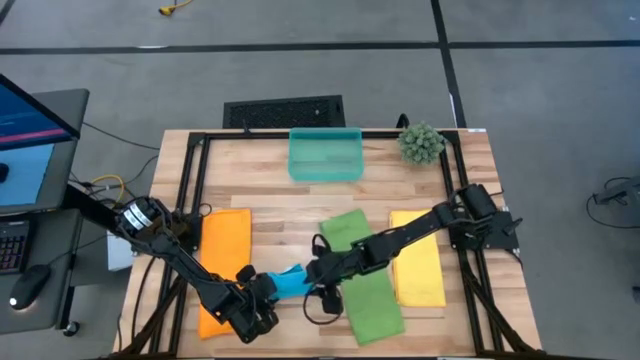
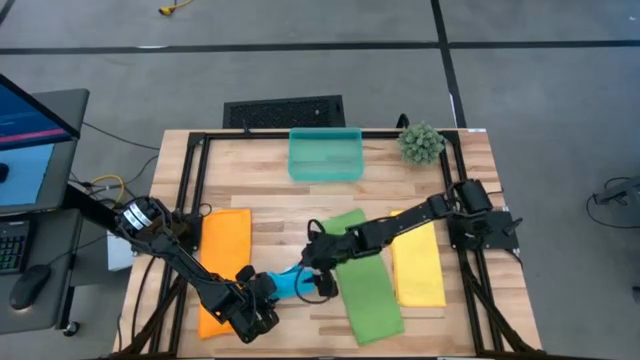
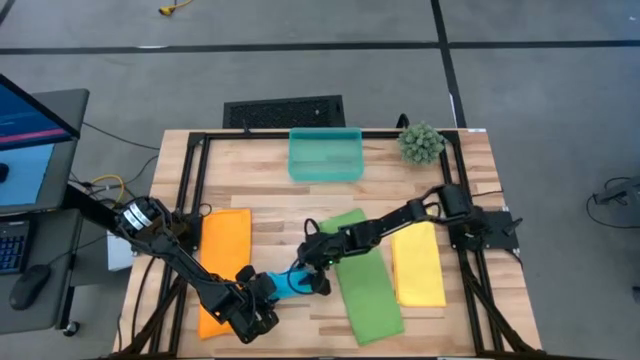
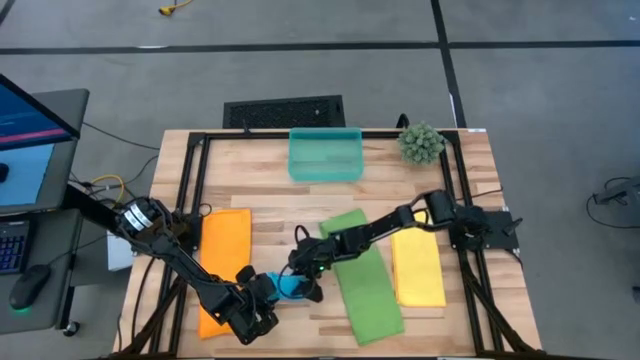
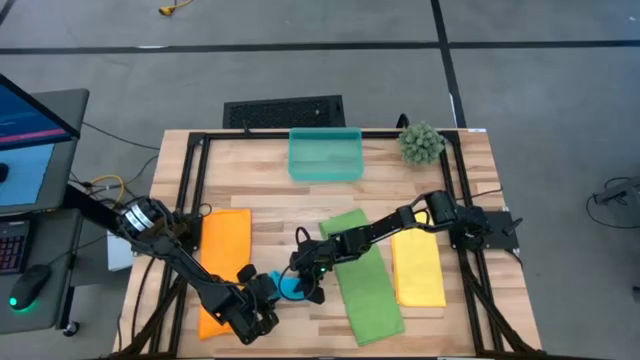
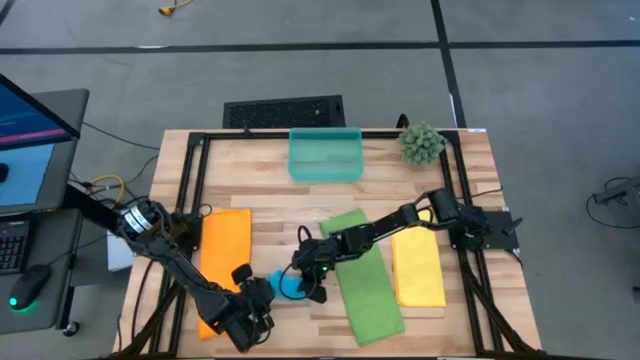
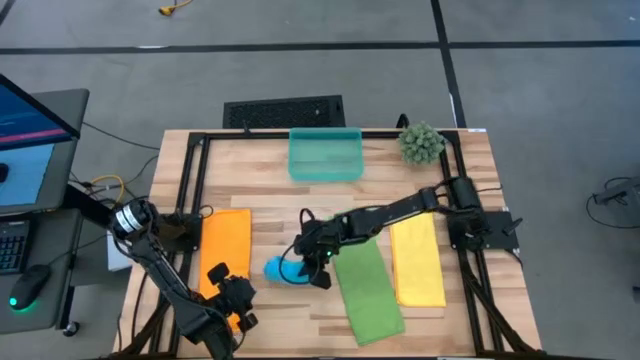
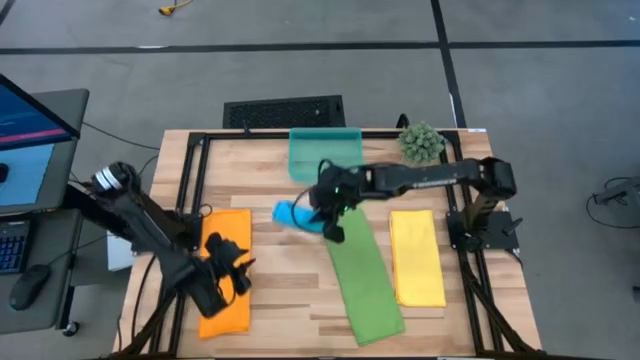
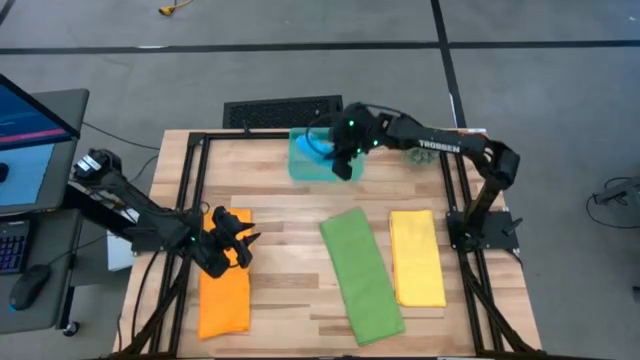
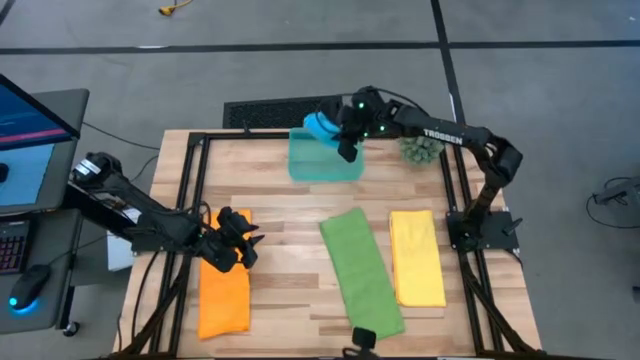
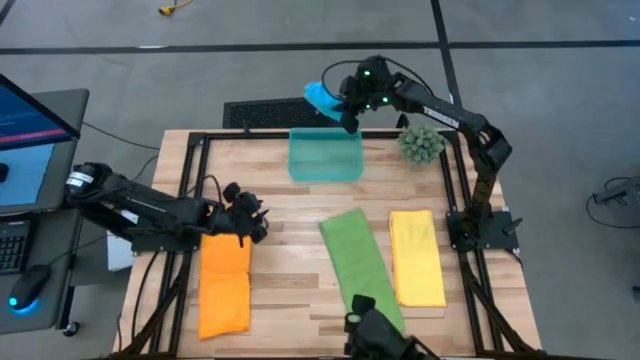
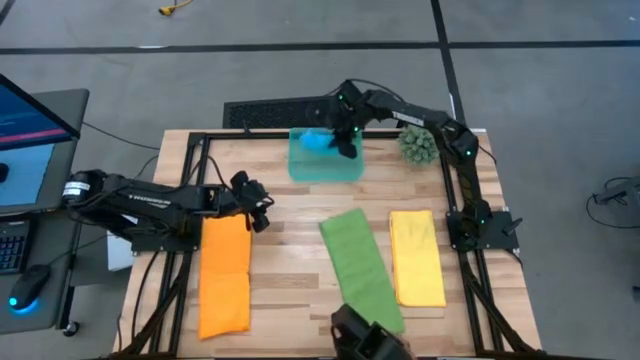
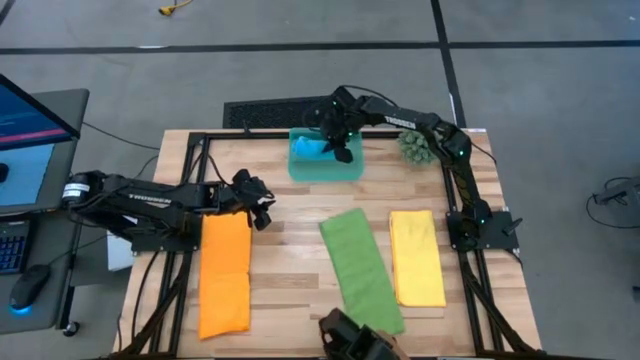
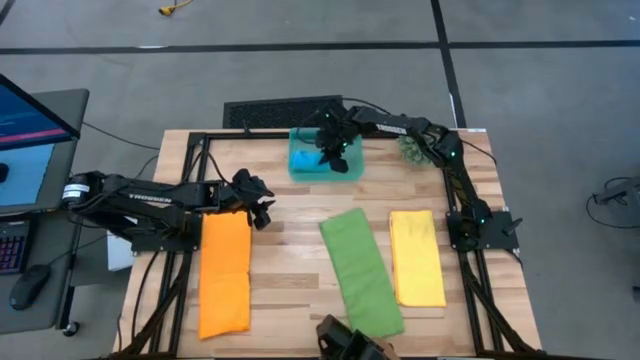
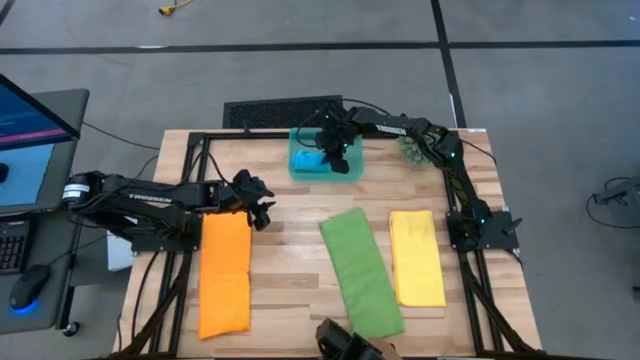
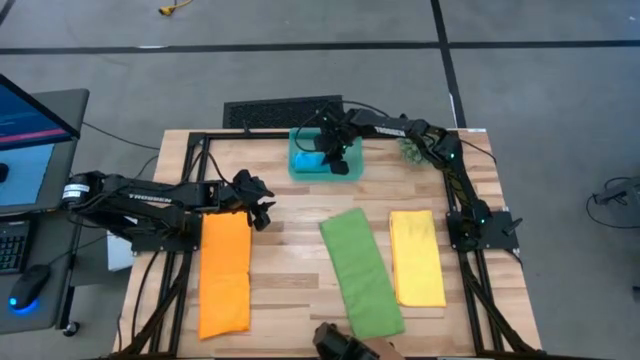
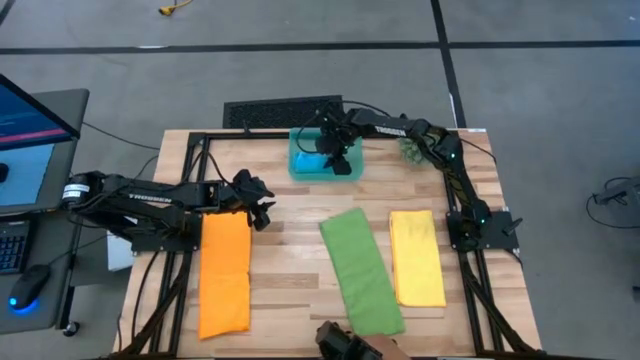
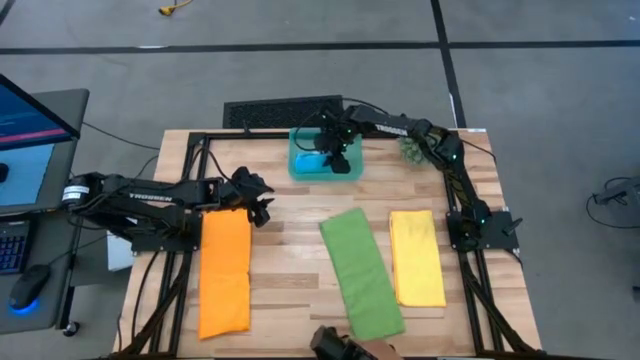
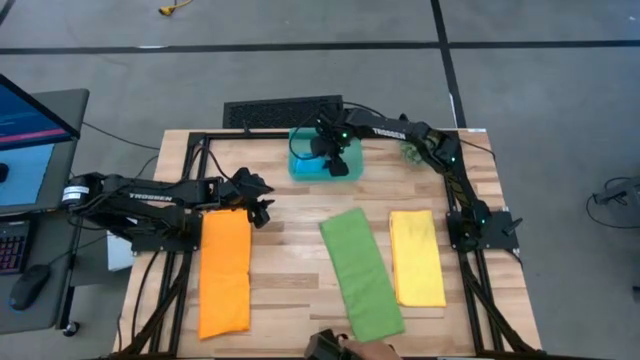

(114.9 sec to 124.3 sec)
Task: Roll microfiber towels into tight, uniform cylinder then place into a basket
Put the rolled blue towel into the green bin

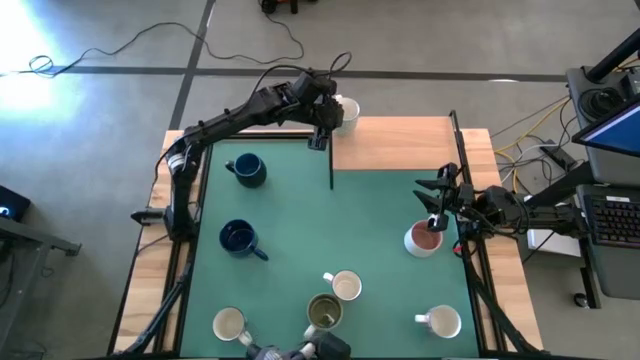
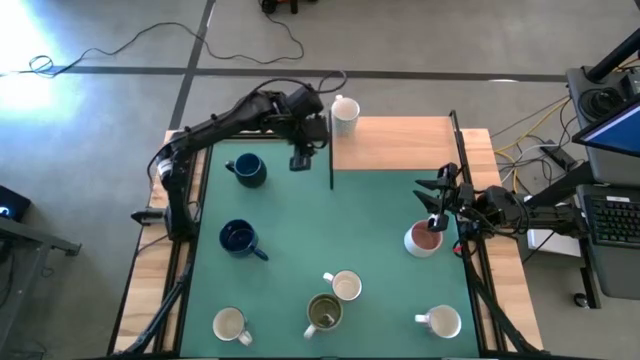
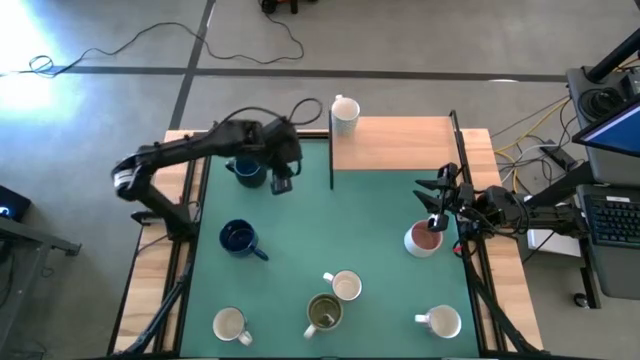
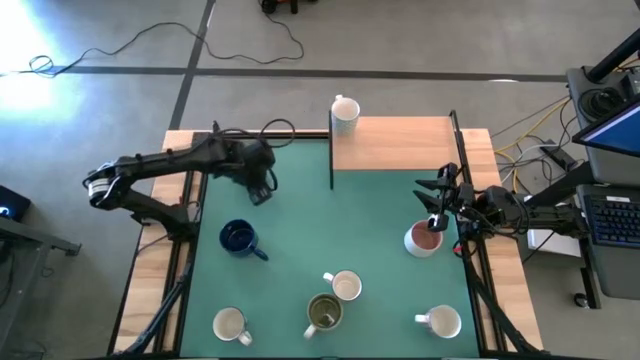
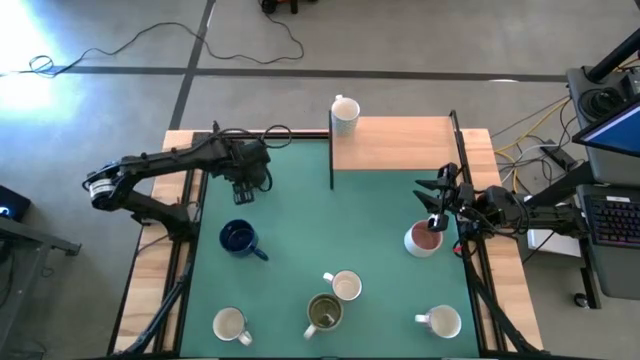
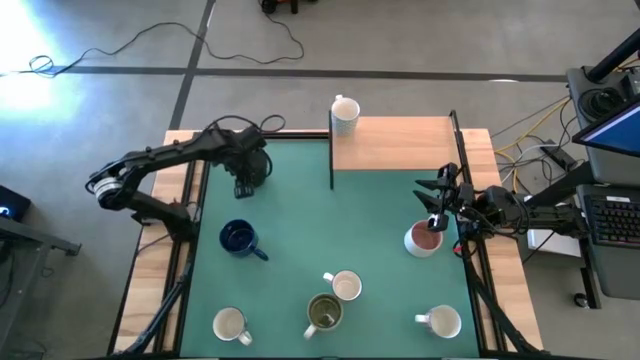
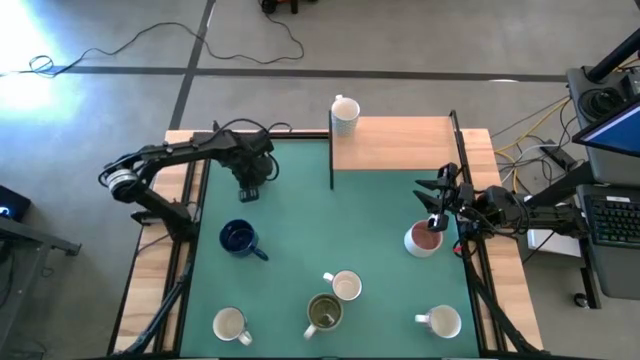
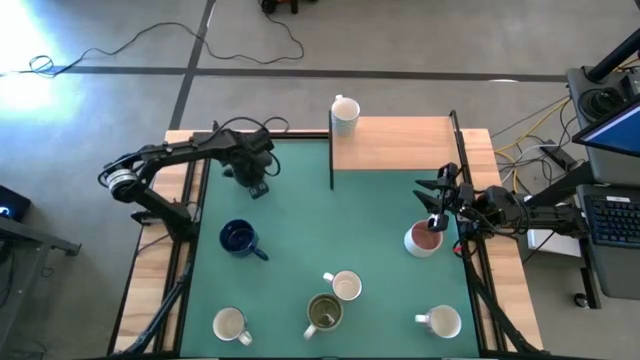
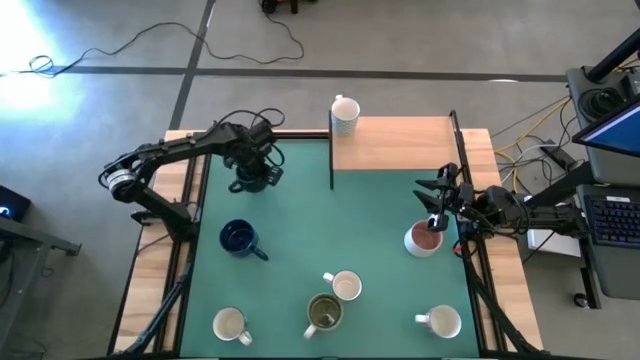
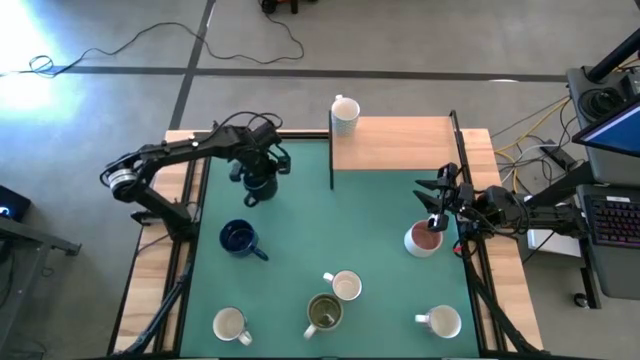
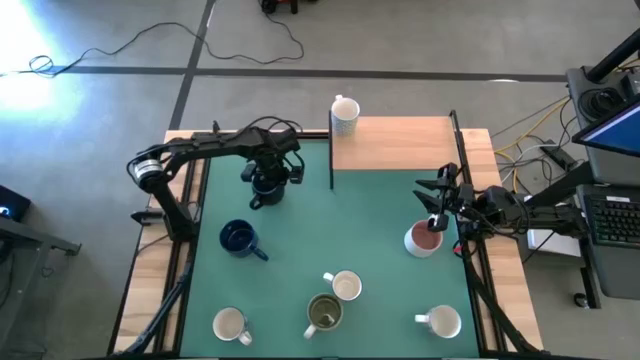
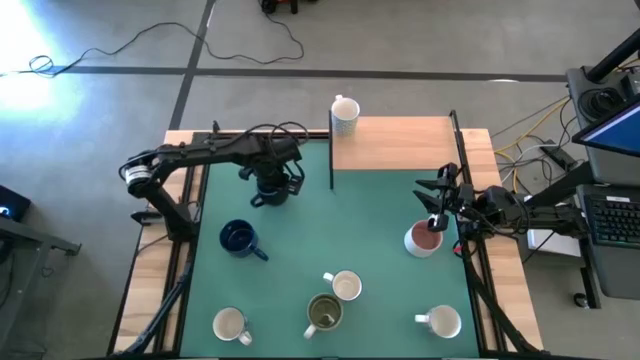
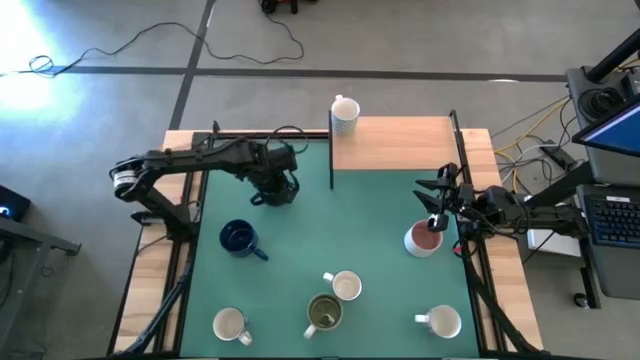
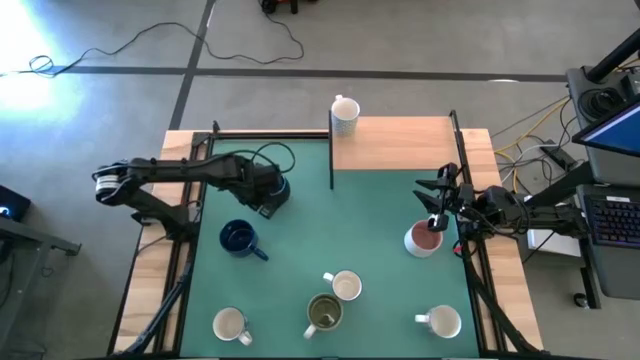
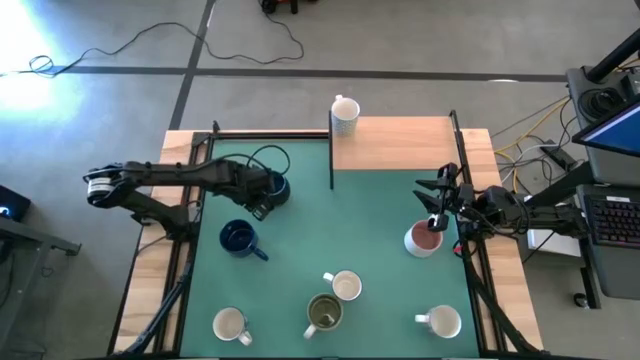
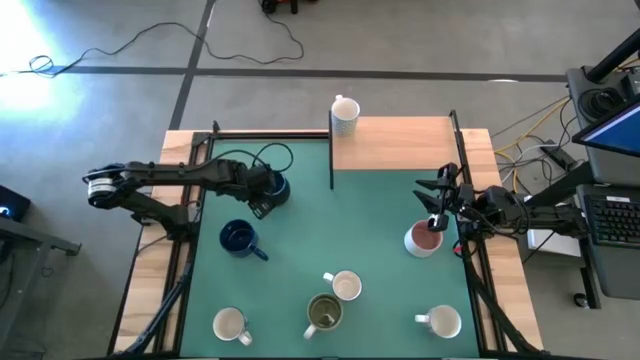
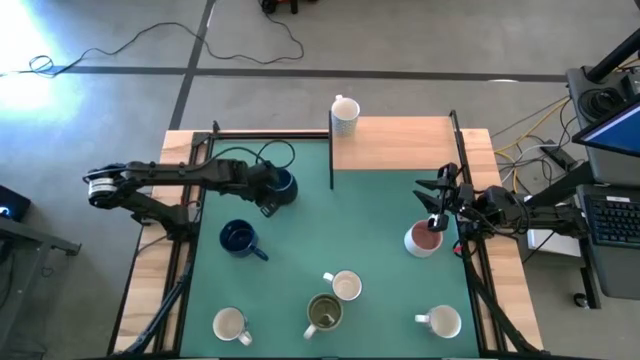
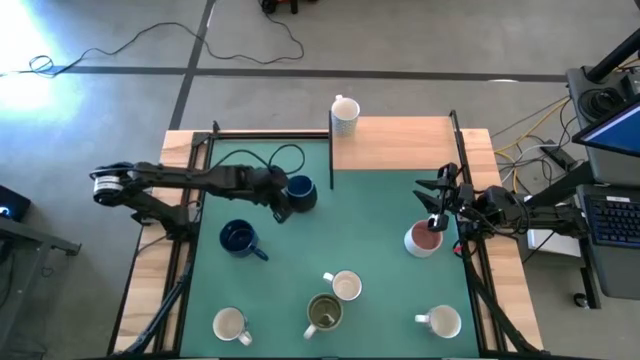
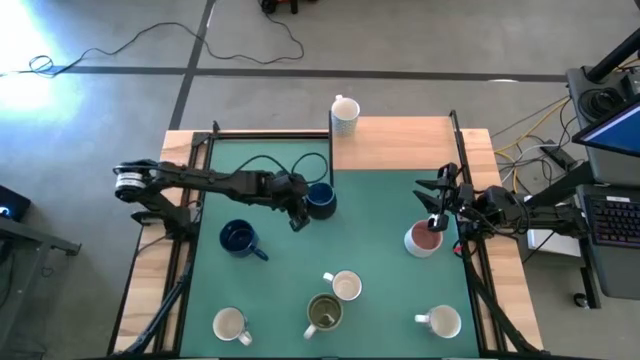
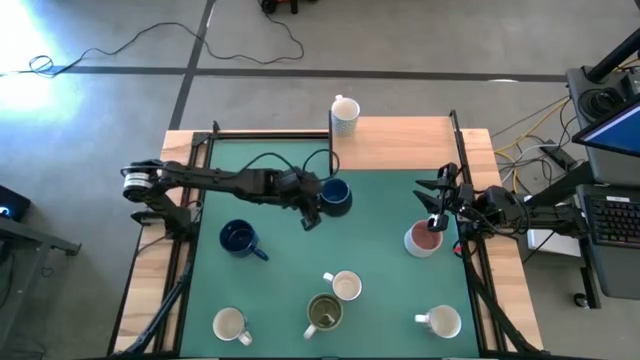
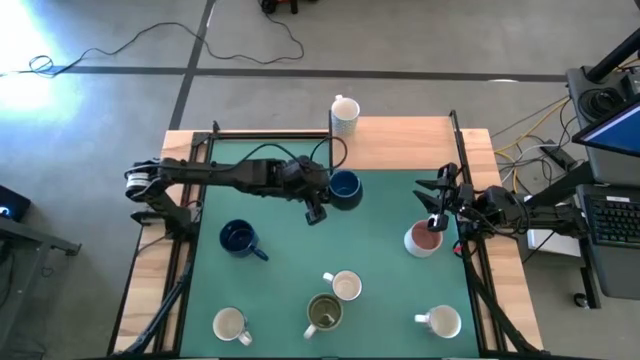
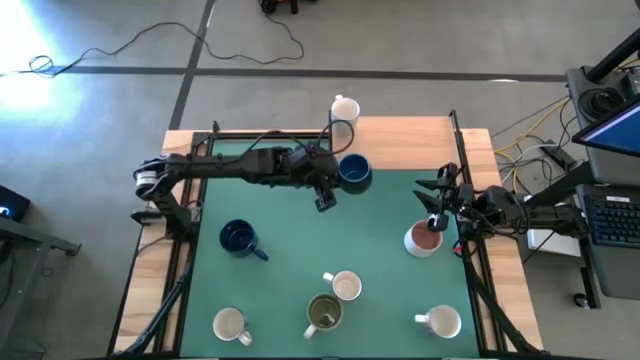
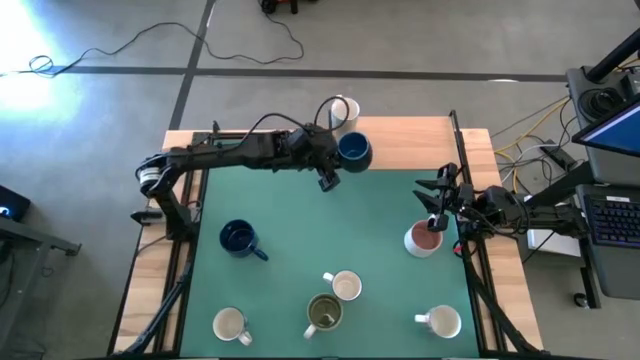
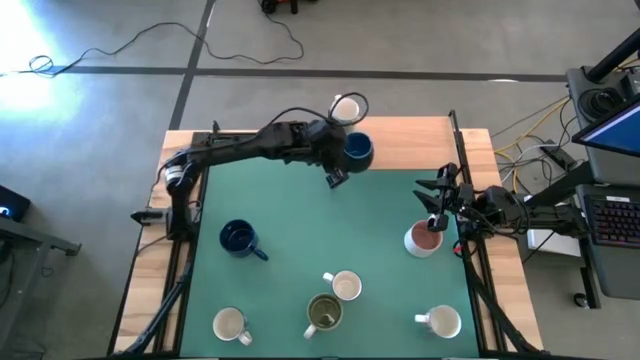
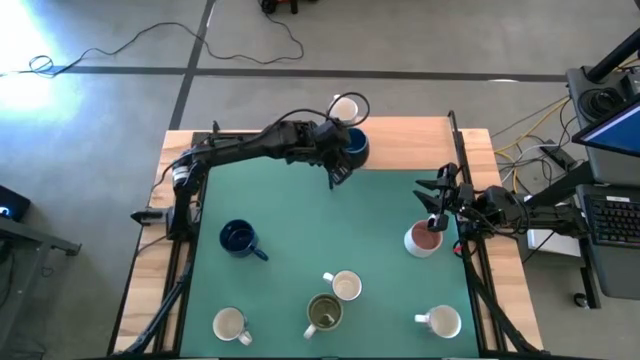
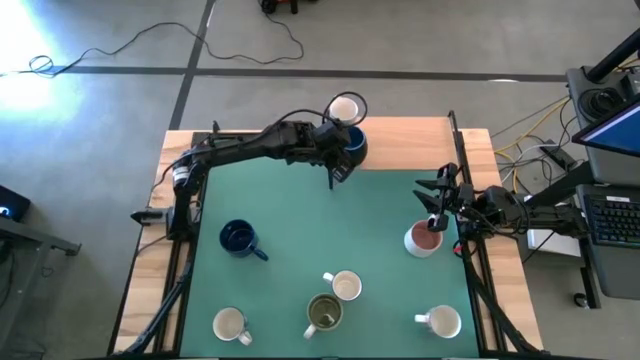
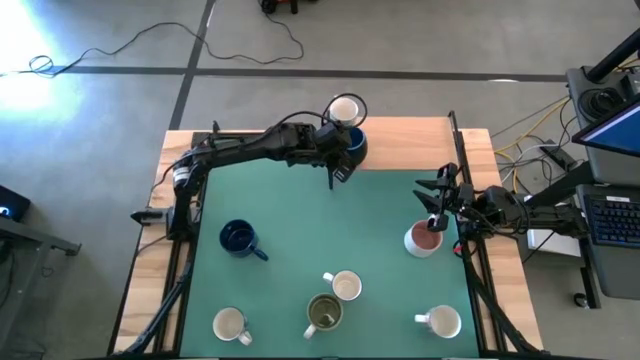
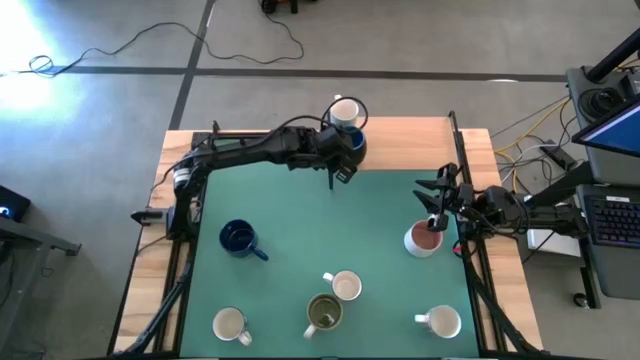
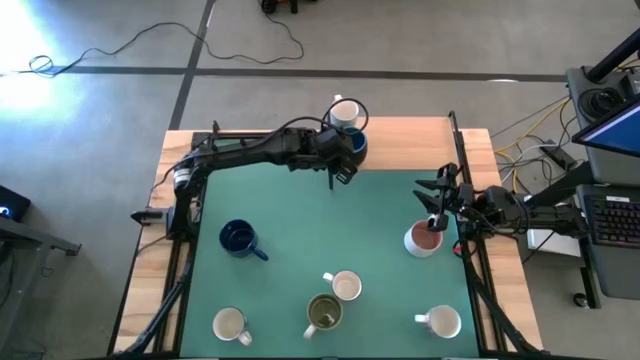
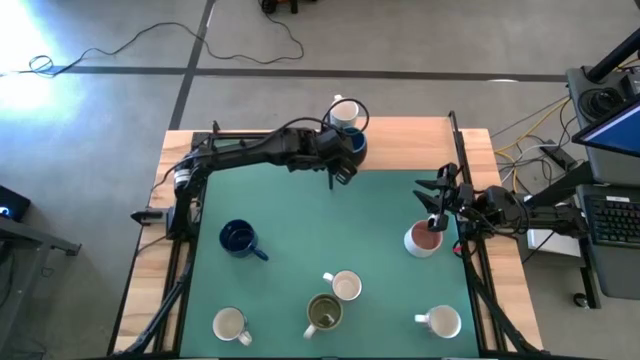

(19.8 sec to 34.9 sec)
Task: Place coffee mugs
Put the black mug on the shelf
